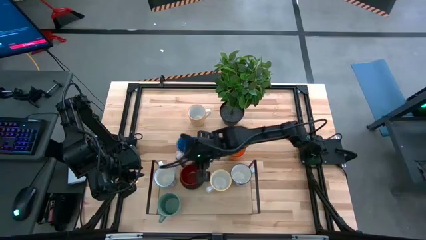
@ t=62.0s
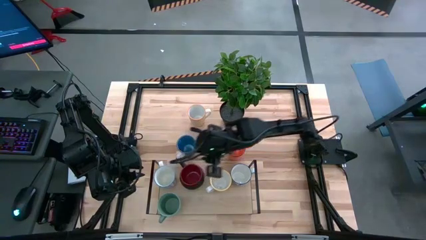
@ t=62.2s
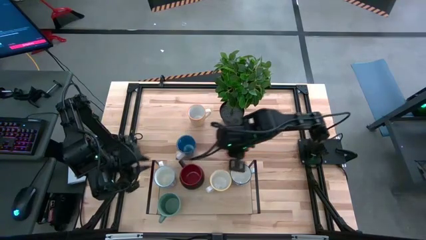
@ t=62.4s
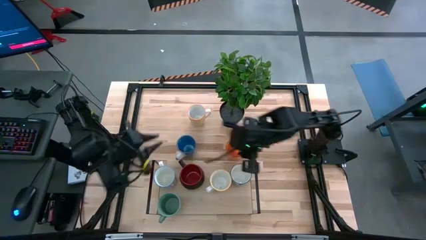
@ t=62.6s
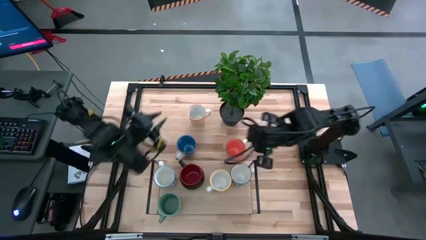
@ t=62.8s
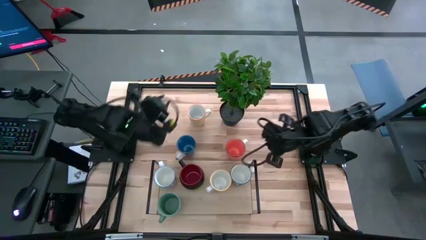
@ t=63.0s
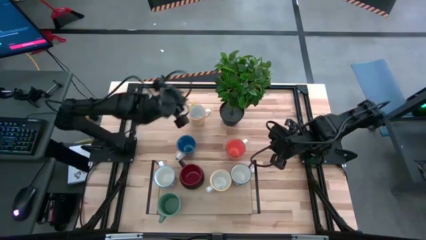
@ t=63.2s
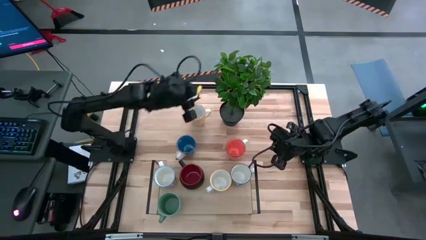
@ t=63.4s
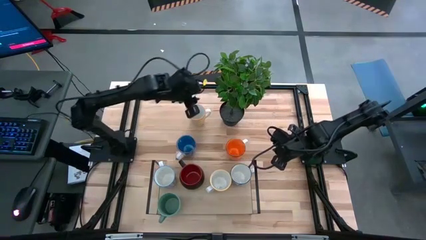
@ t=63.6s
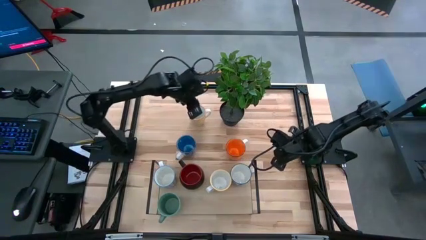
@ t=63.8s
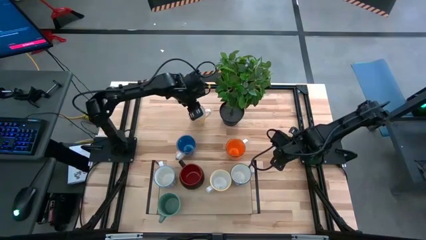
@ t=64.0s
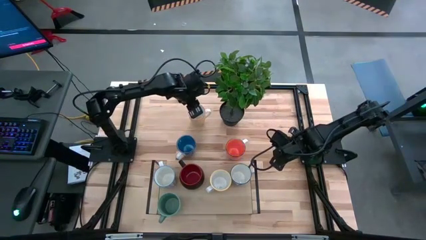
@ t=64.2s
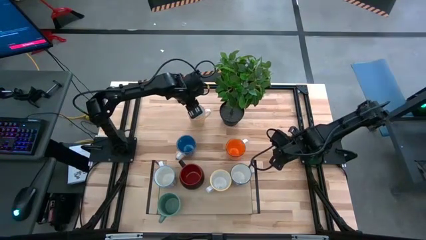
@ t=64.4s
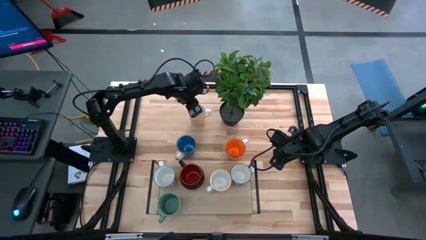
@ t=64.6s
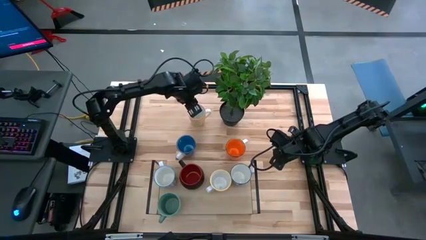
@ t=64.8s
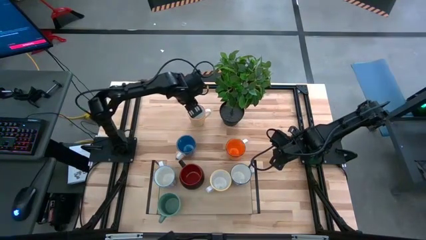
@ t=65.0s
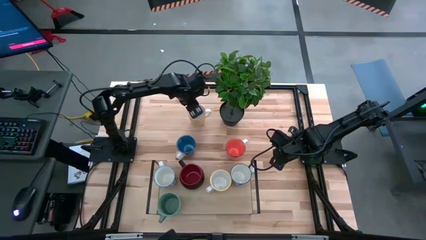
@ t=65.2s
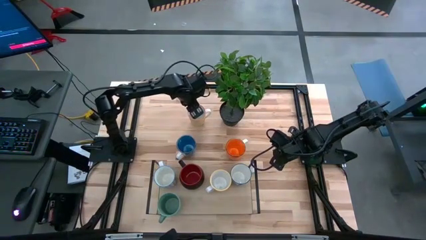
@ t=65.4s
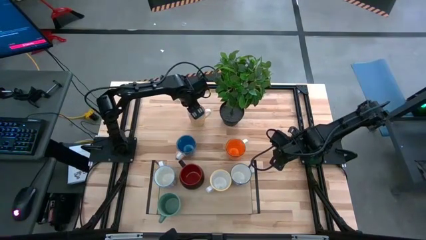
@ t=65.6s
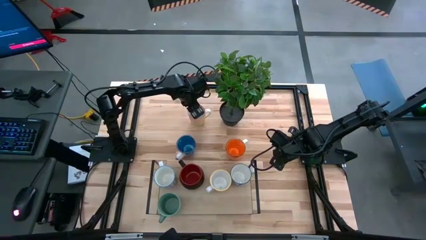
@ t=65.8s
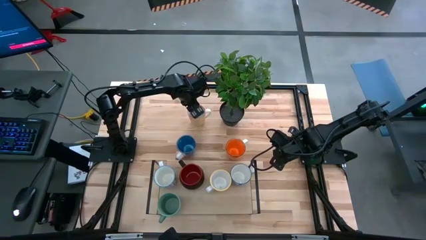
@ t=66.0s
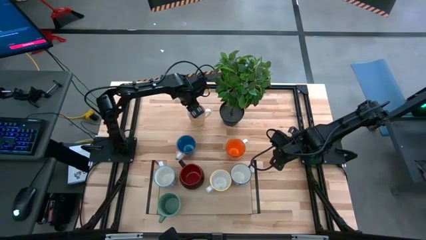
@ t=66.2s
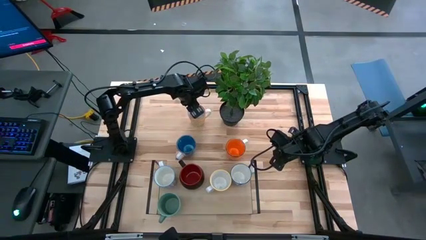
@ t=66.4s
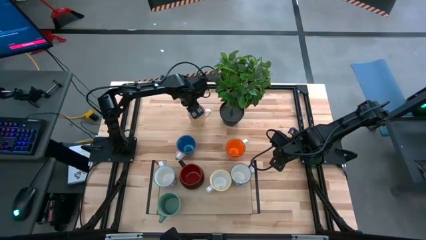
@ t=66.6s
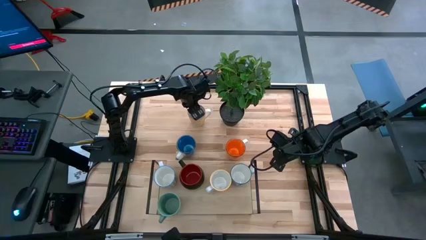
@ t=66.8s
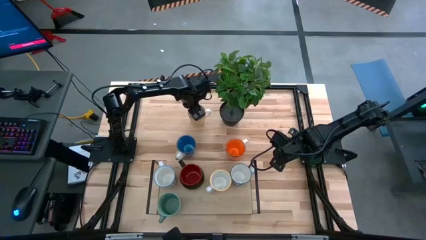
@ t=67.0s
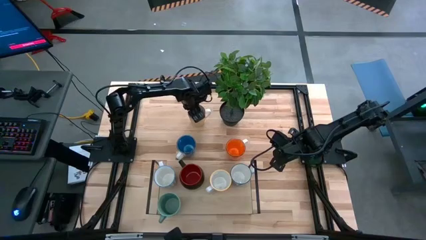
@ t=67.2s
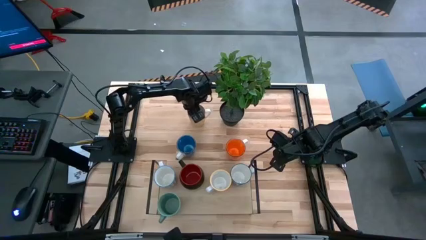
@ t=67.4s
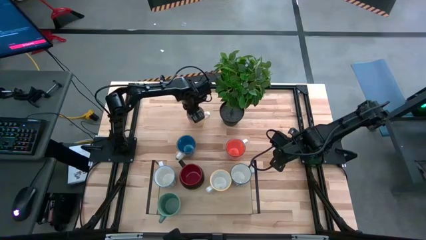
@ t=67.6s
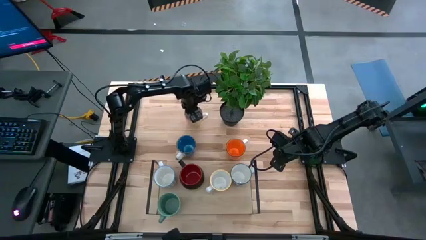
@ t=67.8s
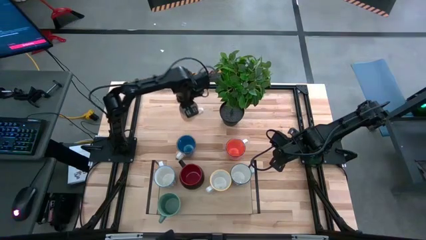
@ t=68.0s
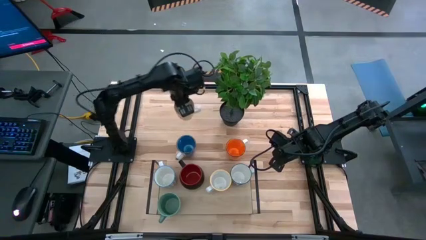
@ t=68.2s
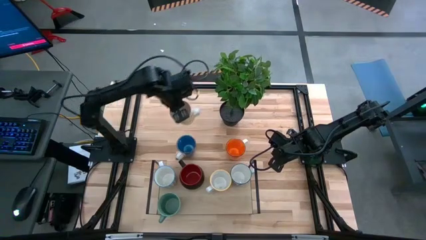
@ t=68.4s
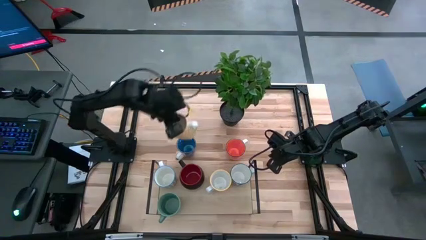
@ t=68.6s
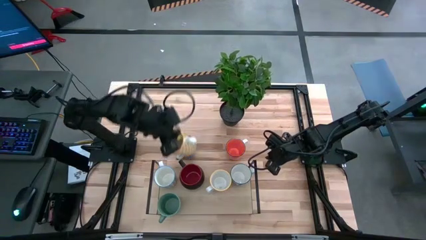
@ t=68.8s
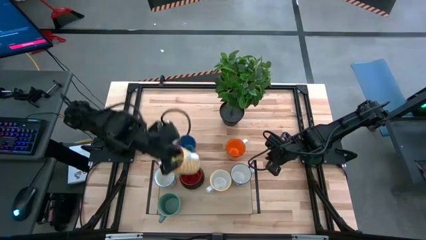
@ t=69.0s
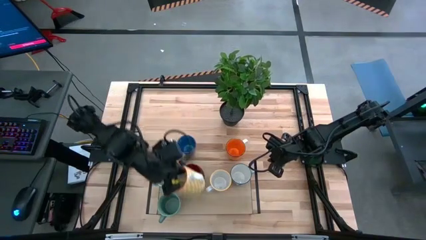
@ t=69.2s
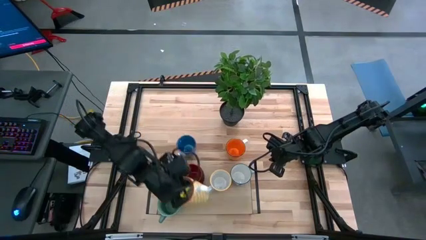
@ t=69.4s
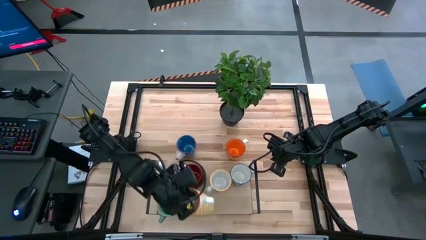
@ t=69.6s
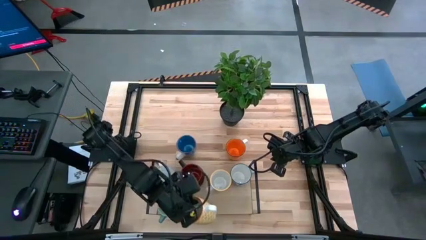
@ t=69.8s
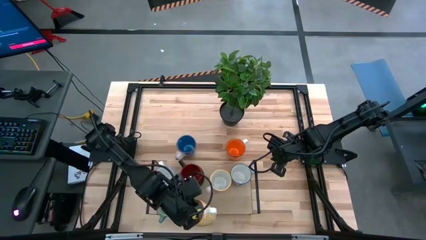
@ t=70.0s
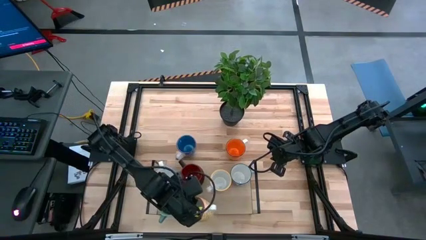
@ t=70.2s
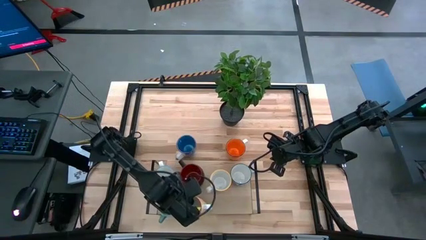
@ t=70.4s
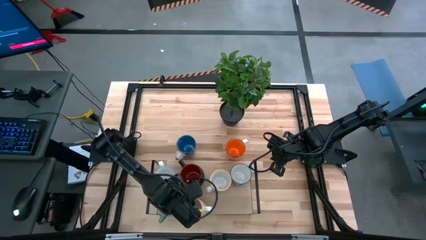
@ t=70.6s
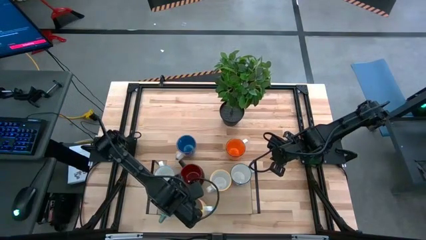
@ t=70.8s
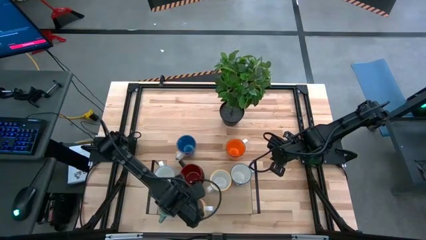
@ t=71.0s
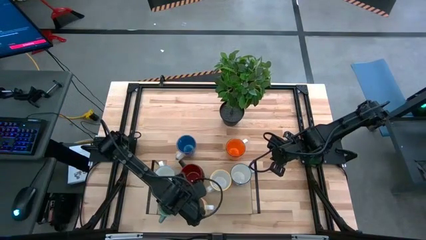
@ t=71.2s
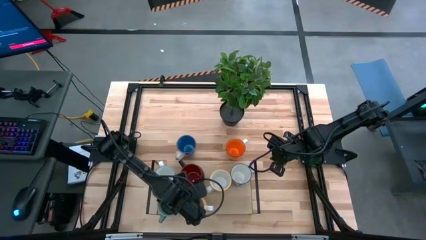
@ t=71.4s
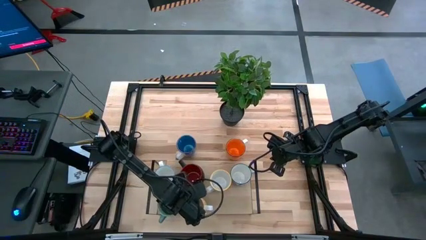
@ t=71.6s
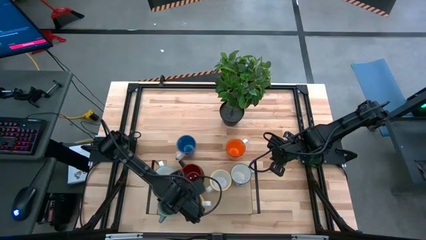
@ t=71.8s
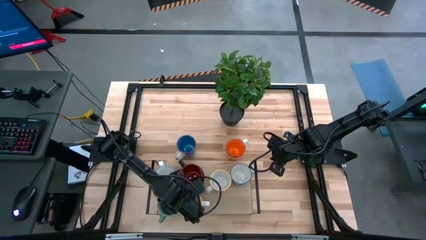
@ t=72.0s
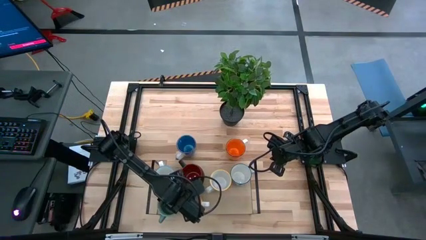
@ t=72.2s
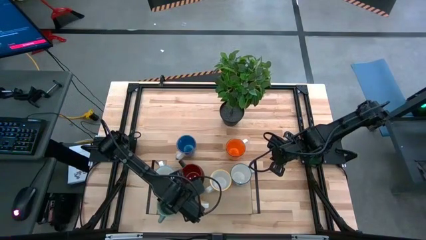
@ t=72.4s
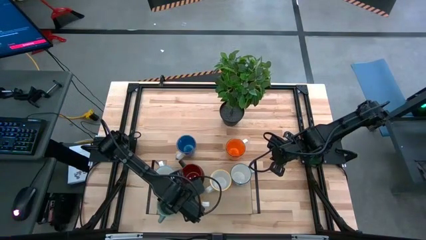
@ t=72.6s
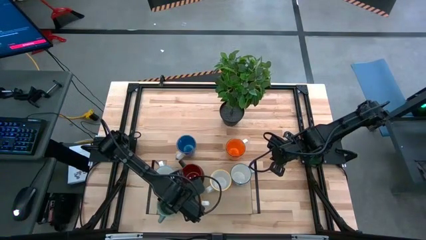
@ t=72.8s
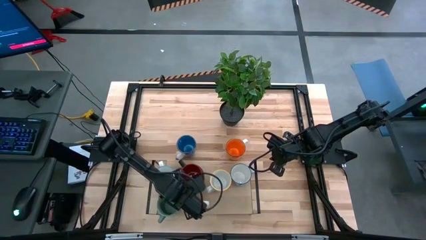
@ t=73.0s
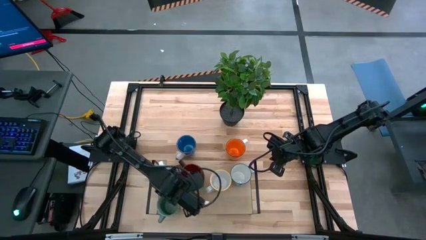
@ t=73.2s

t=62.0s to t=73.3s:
Task: Place coffee mugs
Put the white-yellow pattern mug on the shelf

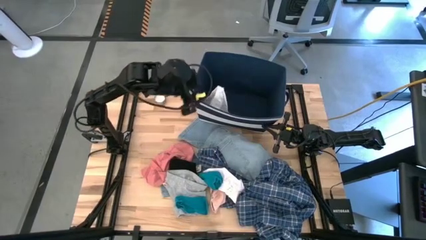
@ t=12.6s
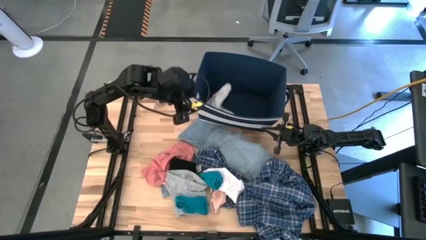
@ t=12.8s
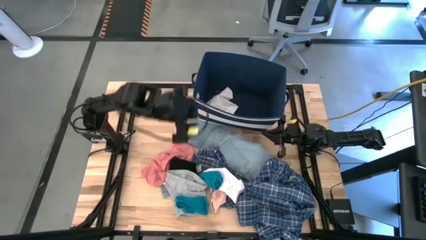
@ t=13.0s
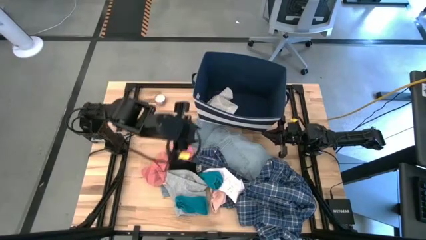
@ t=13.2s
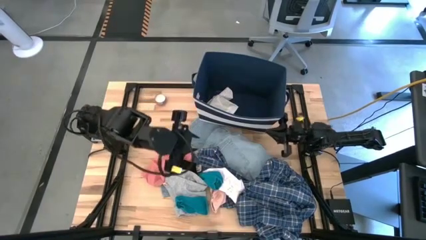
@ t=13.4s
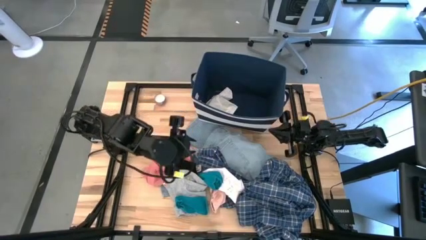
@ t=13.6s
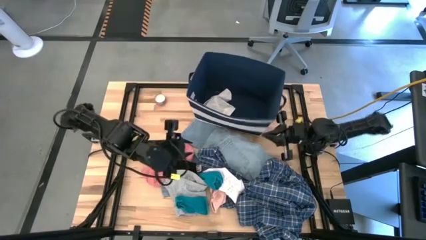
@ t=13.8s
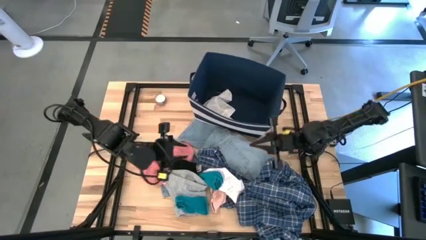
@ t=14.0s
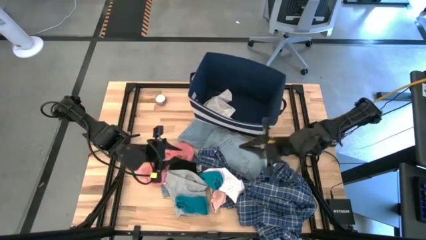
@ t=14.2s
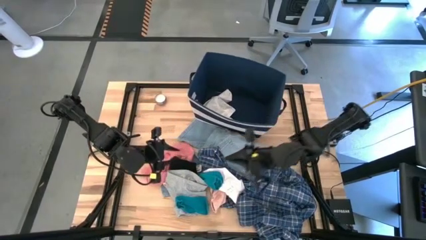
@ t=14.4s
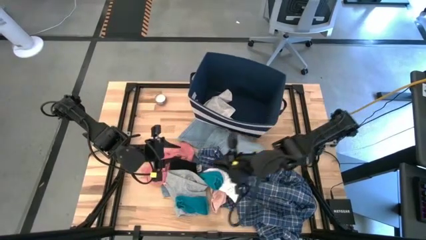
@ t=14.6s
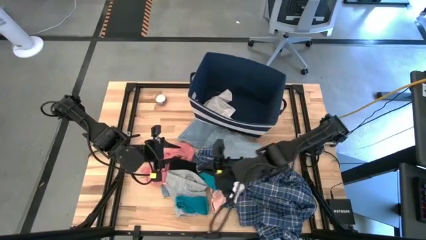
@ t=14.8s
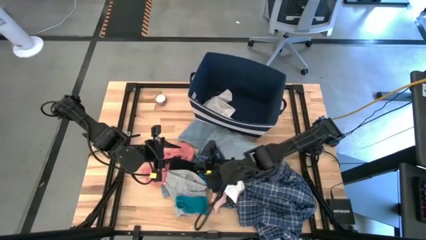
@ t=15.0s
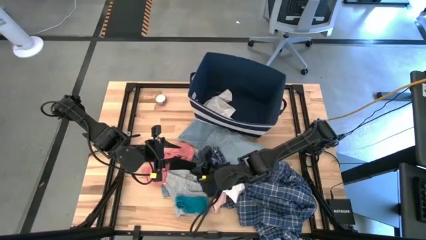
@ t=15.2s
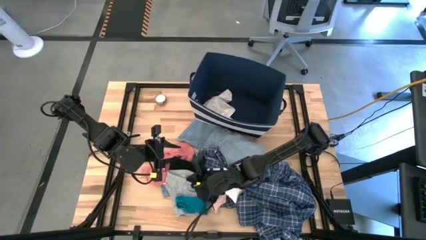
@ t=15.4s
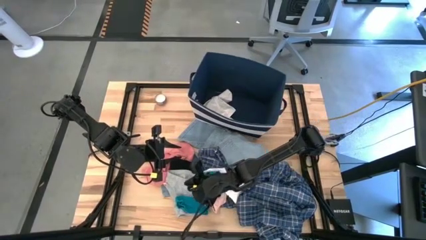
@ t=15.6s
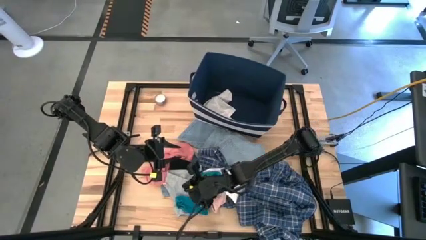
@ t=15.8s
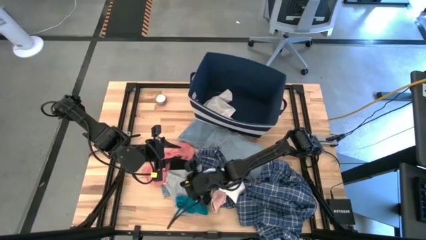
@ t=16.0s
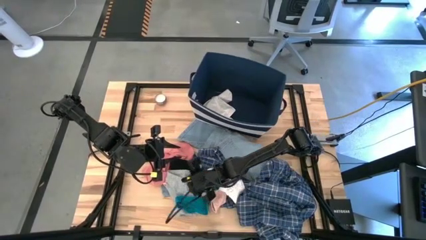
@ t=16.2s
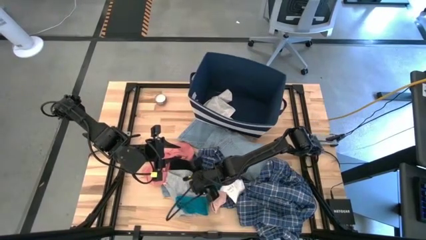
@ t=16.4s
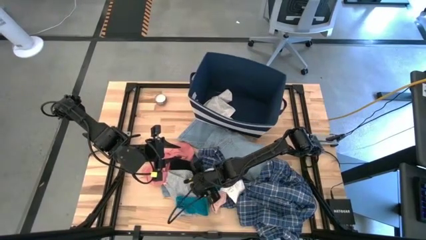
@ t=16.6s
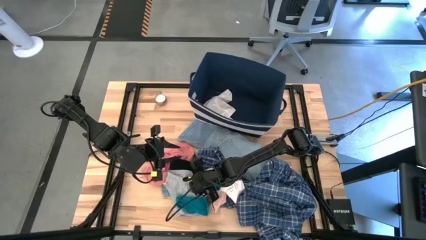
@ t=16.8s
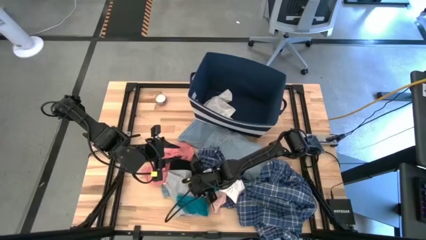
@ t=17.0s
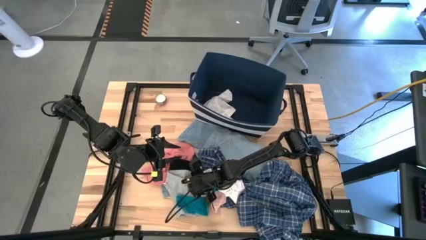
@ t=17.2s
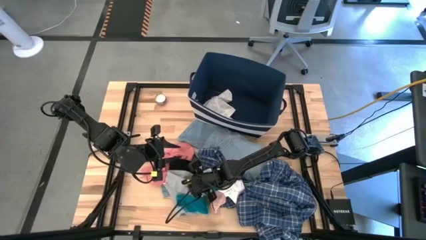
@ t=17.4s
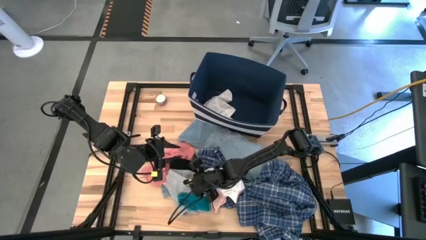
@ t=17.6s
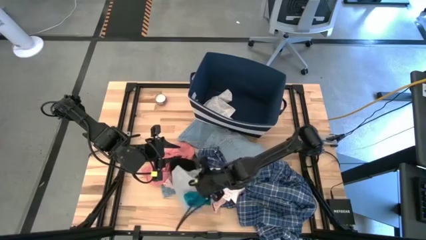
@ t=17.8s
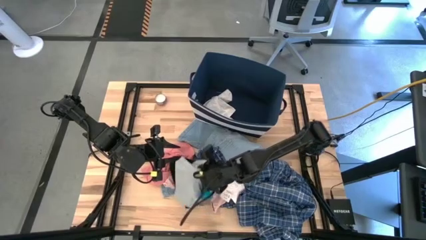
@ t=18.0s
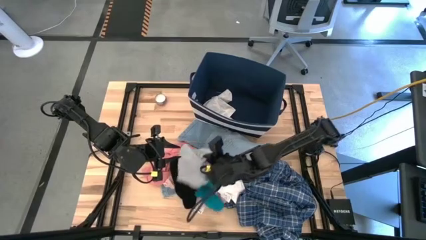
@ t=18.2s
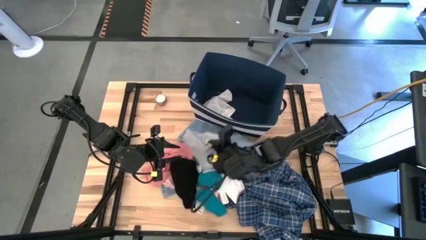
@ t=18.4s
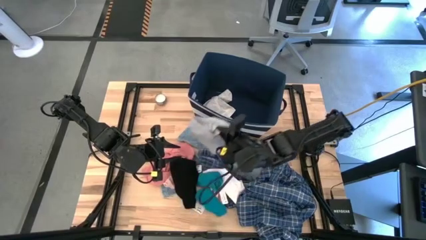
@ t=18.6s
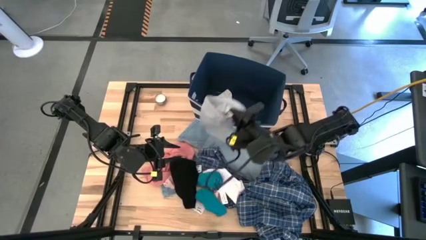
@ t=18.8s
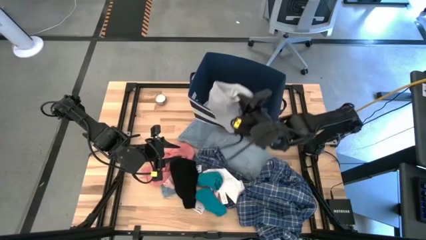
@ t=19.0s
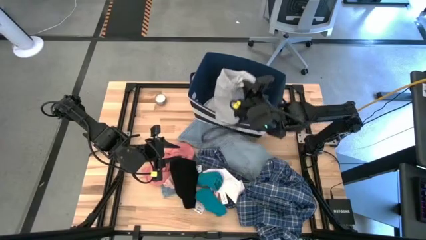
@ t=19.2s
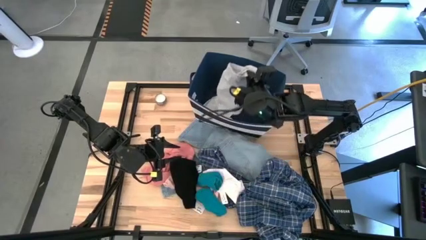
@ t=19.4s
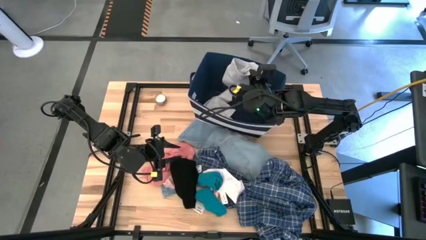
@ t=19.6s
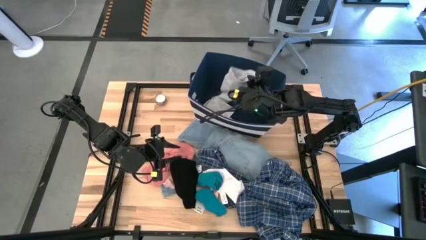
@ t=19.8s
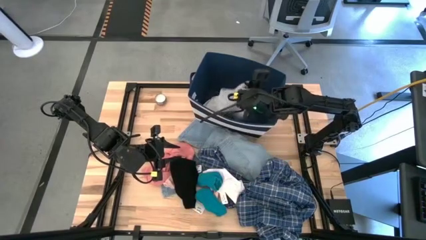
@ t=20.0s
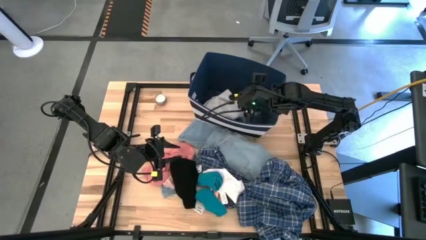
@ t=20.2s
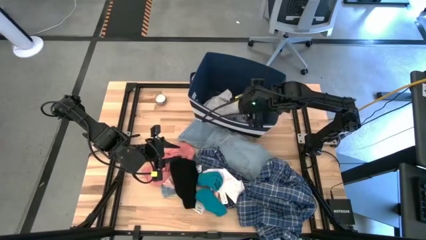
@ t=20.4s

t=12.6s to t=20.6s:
Task: Sort clothes
Put the gray shorts into the blue laundry organizer
